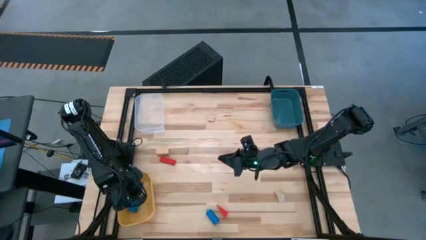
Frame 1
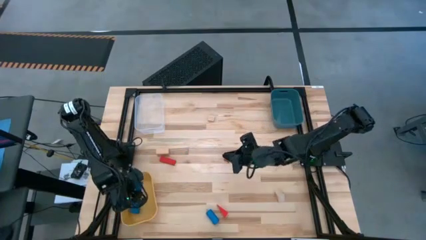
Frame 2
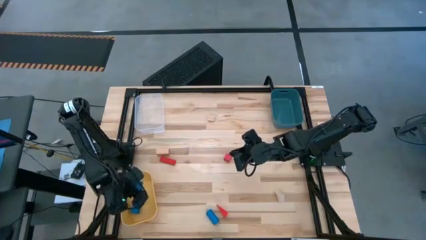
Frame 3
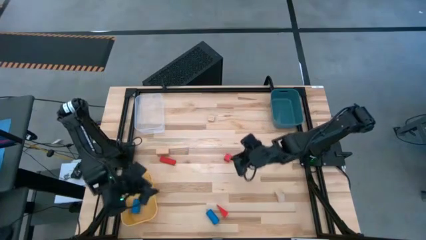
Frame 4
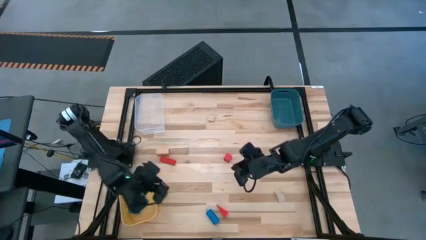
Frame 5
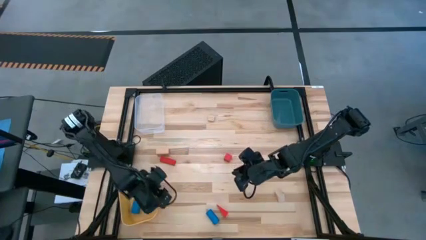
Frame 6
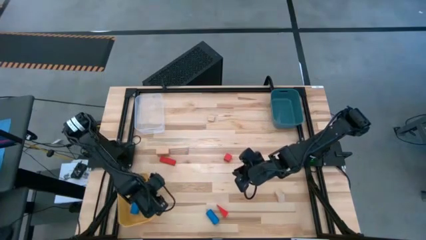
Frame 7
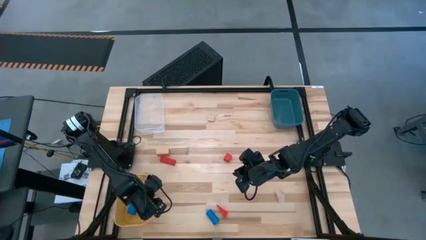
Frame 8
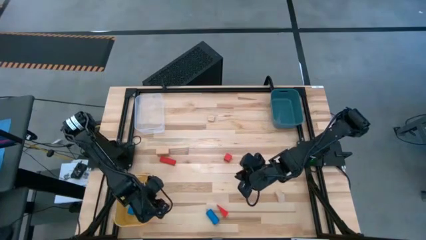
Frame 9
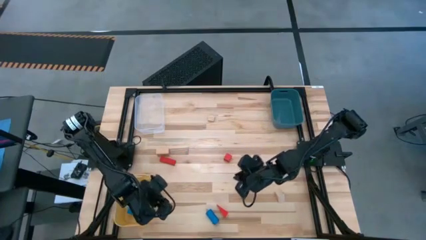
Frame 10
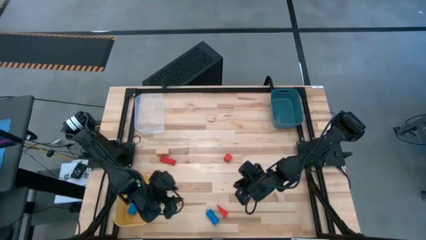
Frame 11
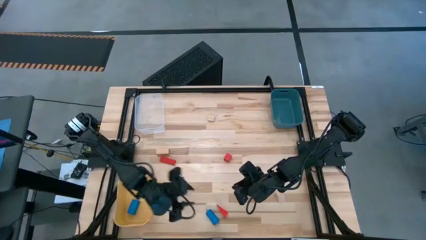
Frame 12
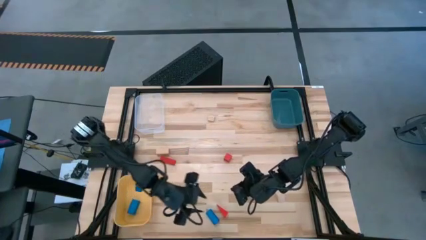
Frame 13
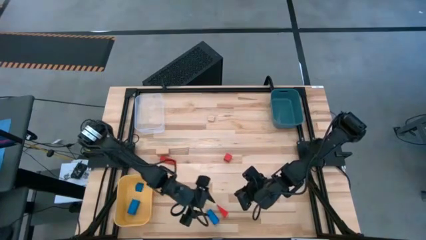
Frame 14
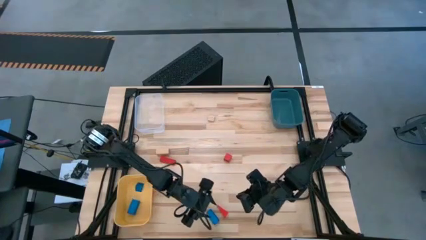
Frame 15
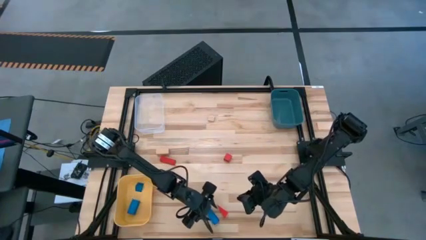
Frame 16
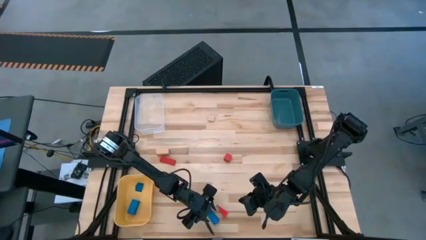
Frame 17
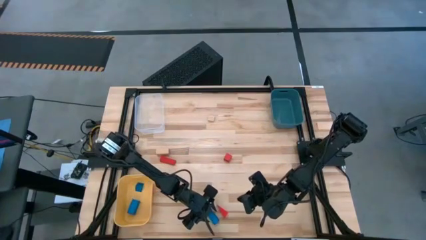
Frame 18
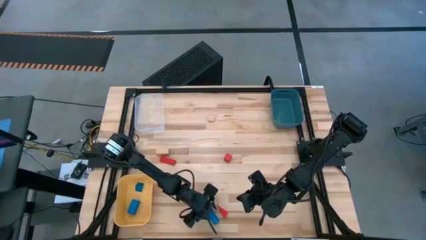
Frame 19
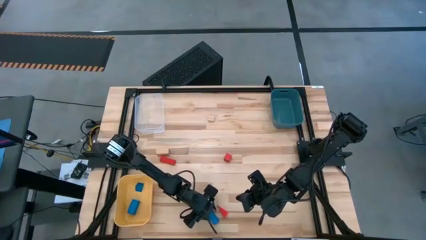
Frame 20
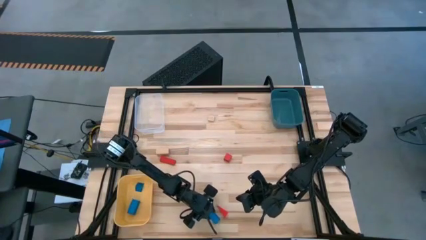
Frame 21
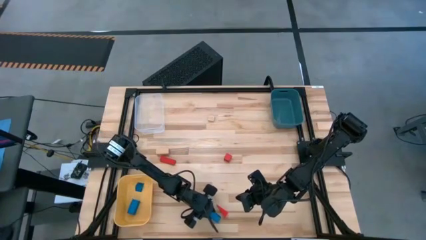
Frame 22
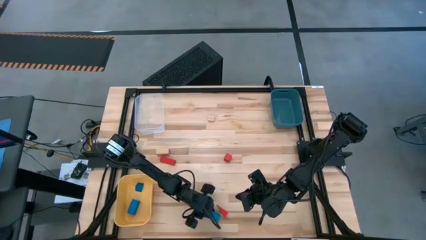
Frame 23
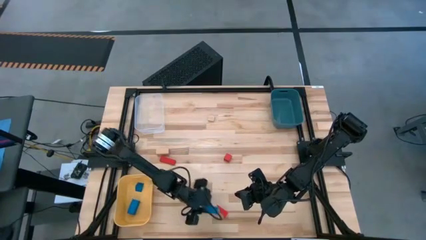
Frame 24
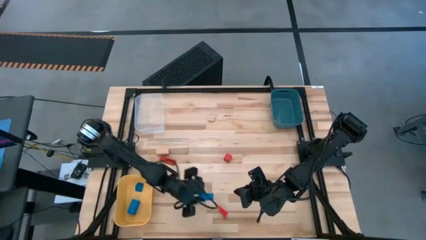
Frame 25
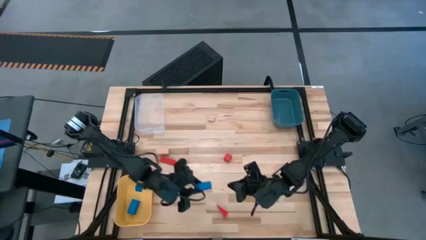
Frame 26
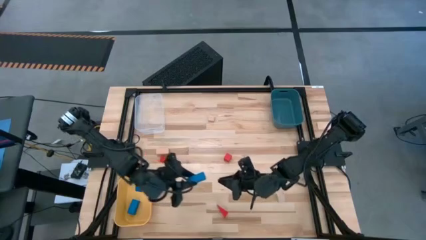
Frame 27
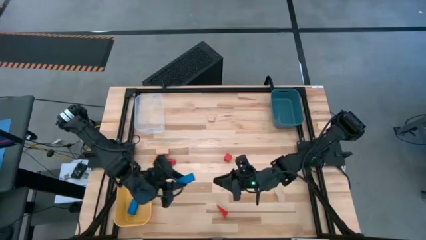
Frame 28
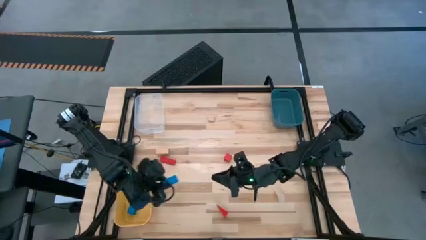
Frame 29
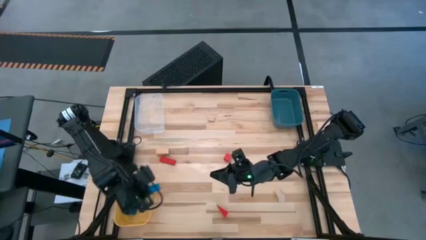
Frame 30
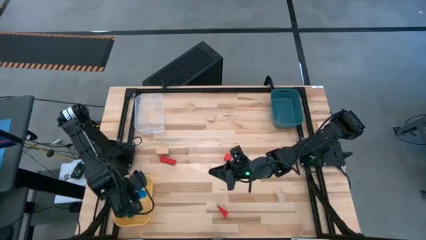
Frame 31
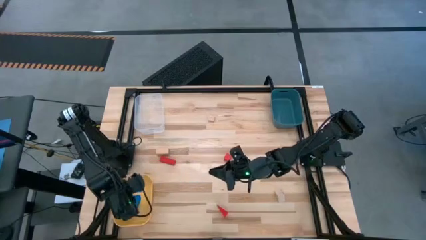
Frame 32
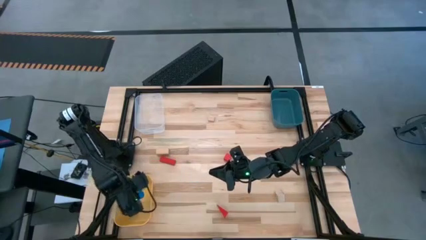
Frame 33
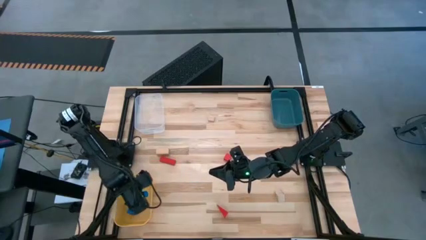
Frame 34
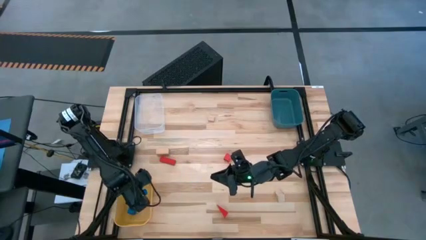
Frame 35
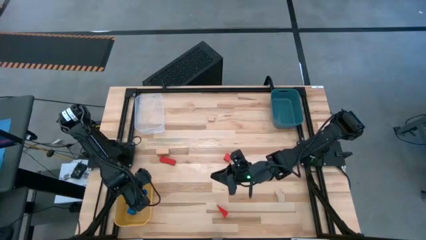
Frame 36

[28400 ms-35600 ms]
Task: Sort & place blocks by color
Put the blue block into the yellow bin

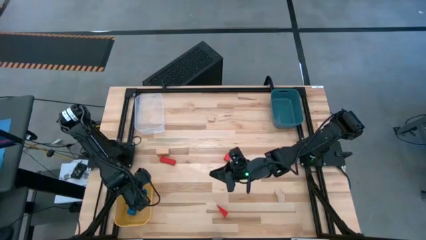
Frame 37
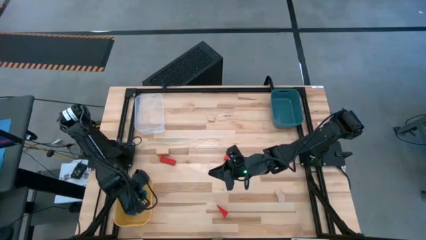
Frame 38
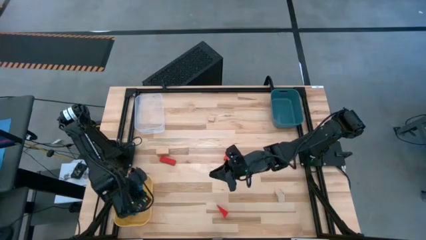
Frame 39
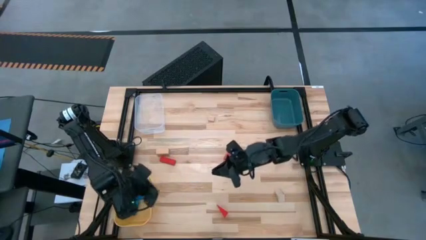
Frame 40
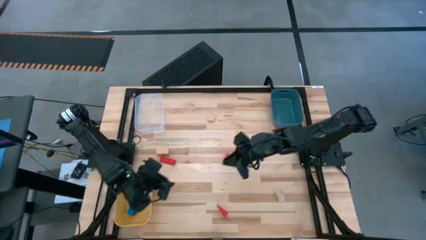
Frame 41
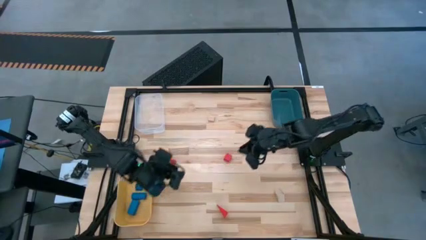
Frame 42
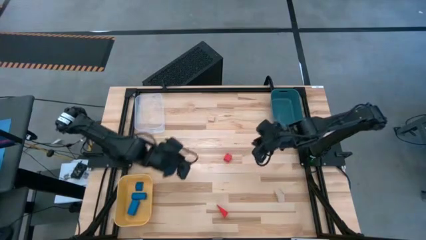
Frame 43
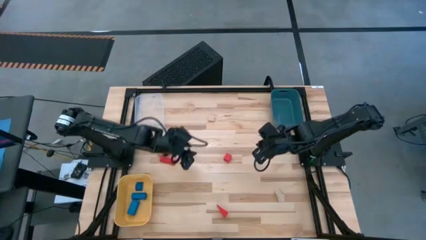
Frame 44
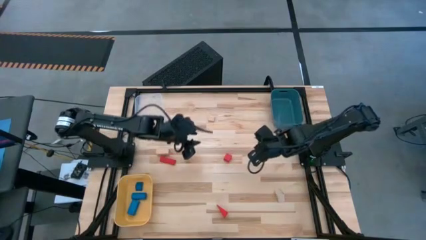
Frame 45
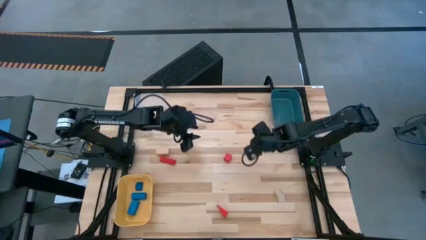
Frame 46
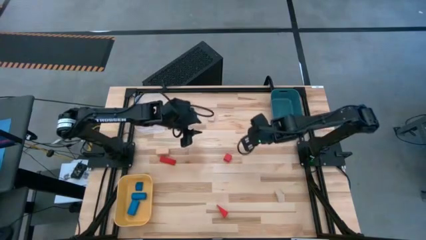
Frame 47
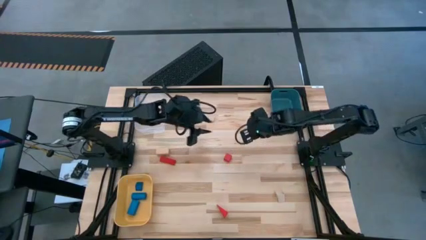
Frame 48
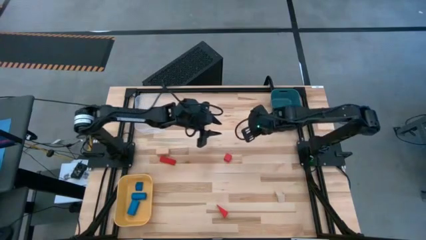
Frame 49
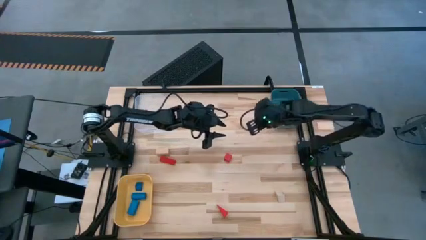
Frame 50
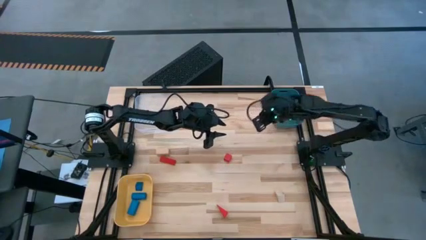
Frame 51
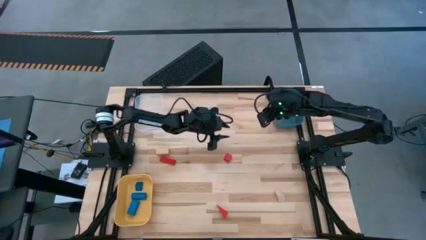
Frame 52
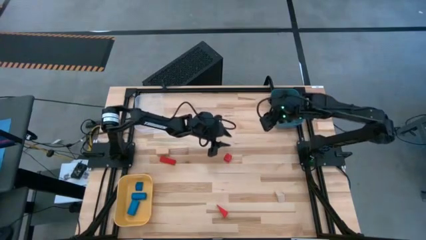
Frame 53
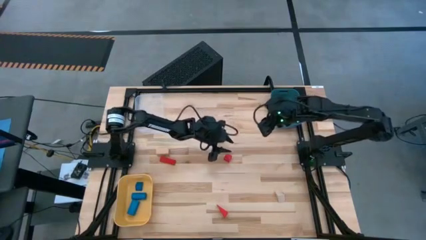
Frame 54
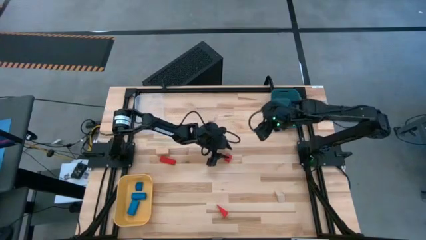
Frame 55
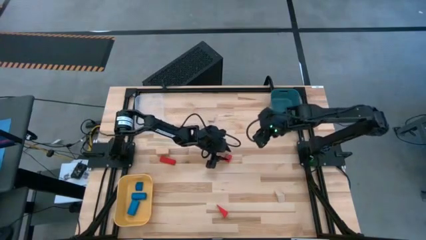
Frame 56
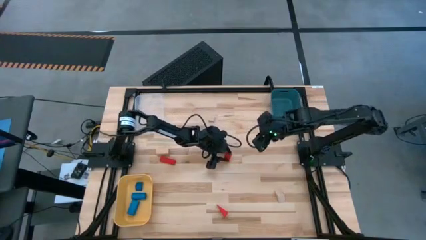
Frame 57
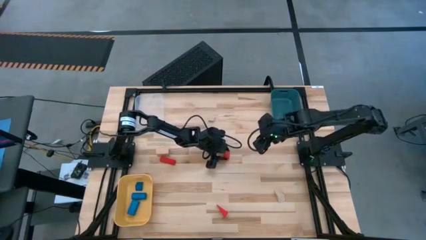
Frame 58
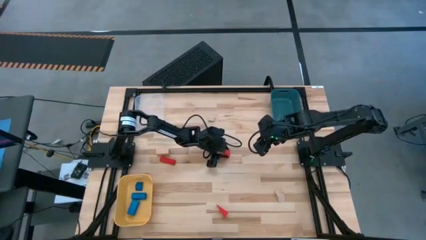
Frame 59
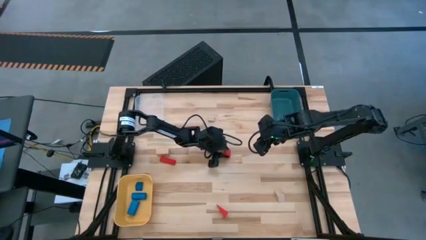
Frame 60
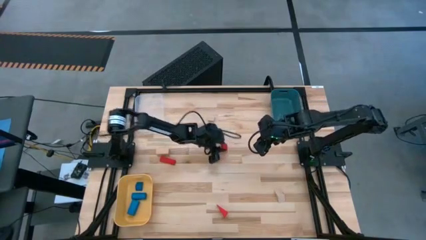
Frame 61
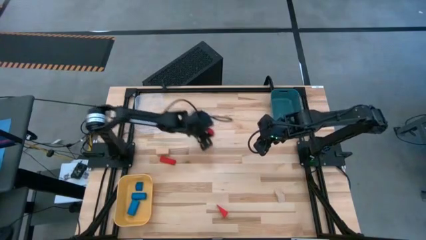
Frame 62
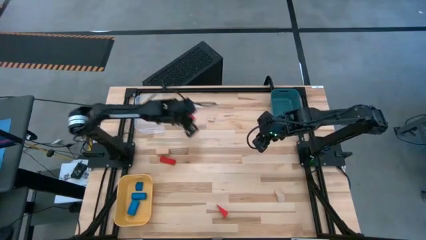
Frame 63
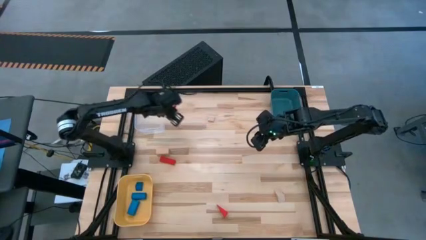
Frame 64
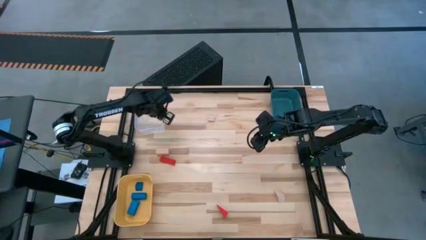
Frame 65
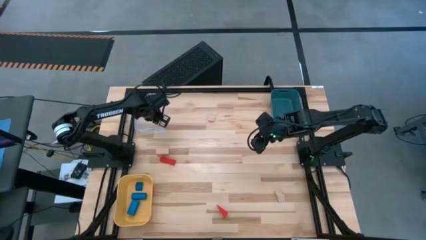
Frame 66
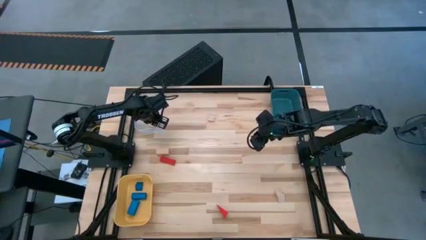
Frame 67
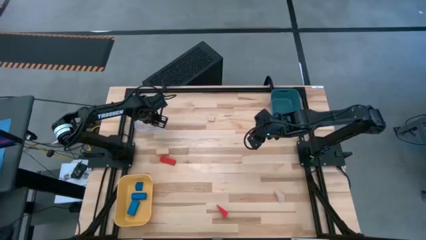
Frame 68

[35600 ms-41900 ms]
Put the top right red block into the transparent bin

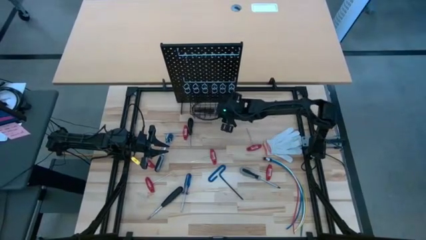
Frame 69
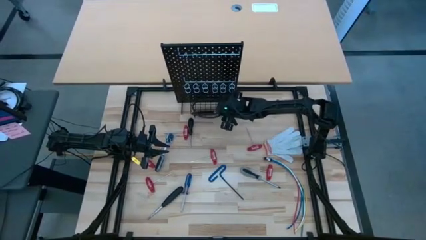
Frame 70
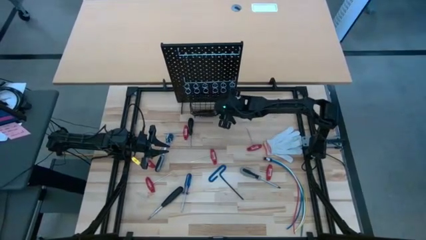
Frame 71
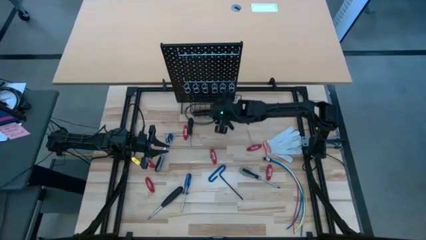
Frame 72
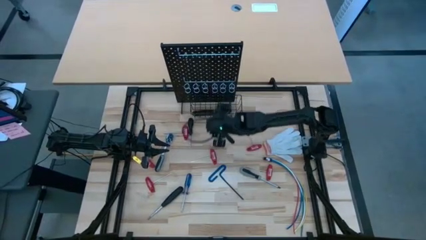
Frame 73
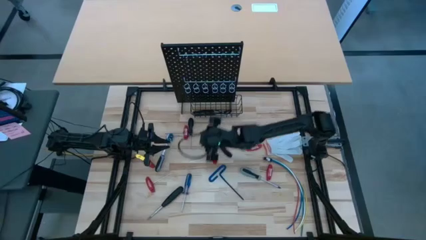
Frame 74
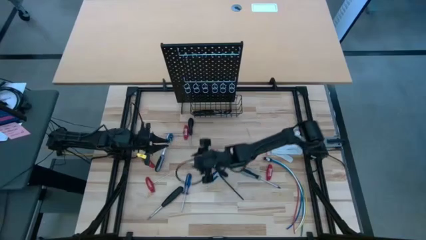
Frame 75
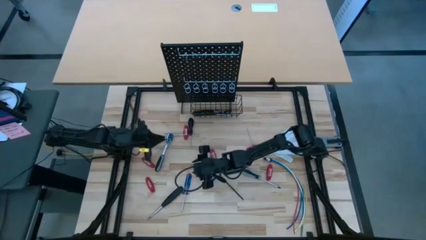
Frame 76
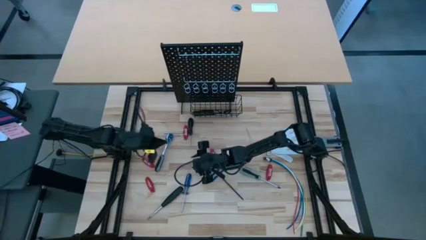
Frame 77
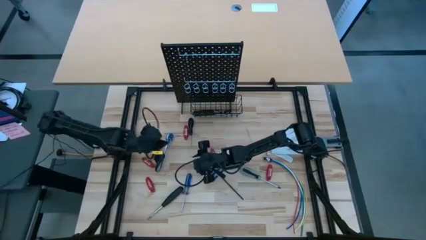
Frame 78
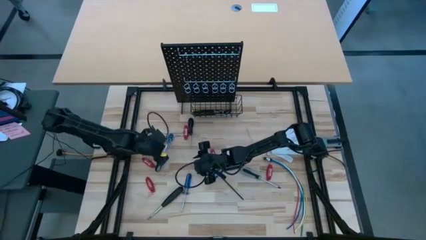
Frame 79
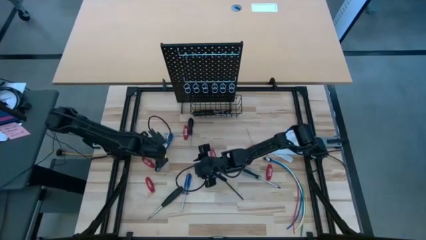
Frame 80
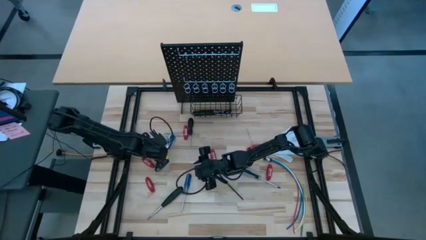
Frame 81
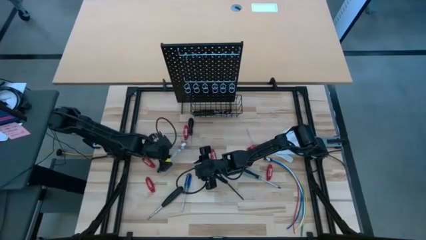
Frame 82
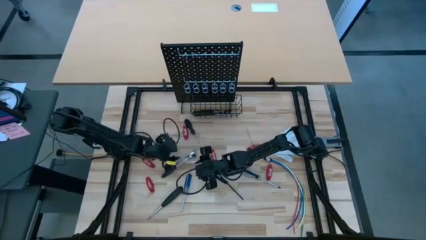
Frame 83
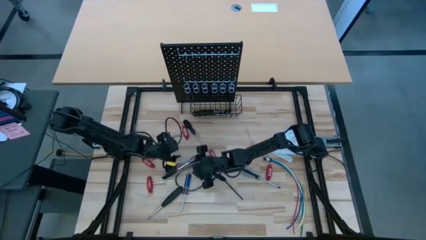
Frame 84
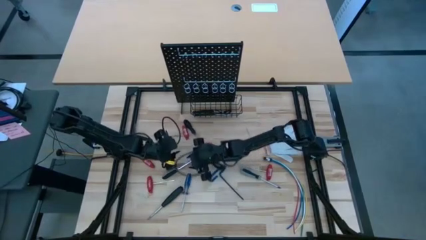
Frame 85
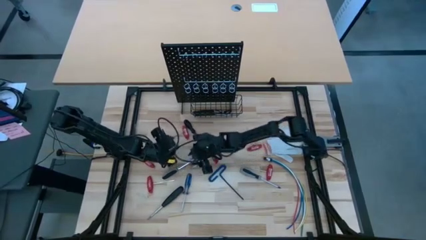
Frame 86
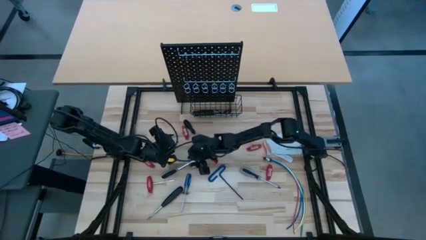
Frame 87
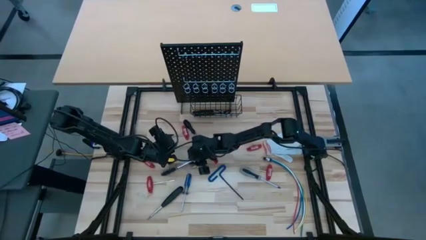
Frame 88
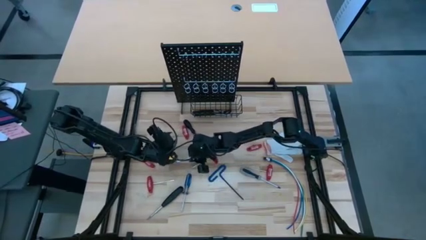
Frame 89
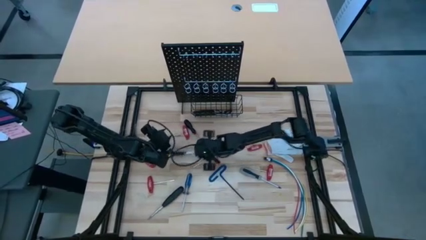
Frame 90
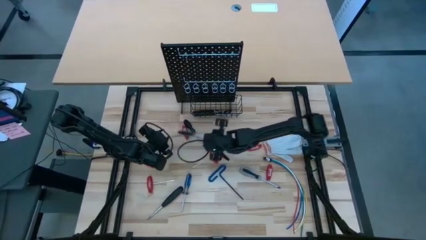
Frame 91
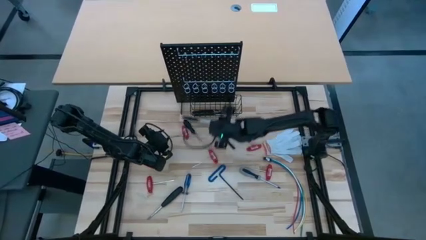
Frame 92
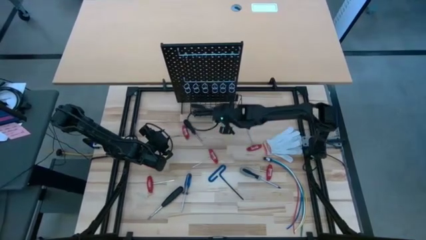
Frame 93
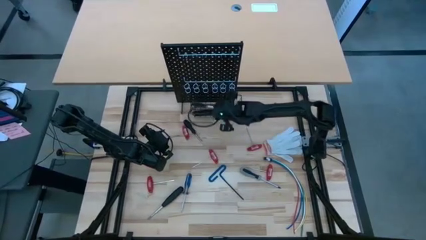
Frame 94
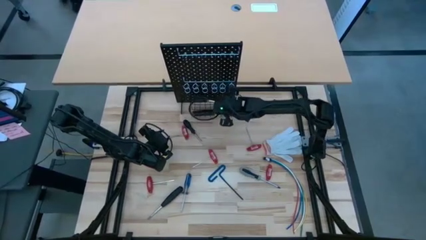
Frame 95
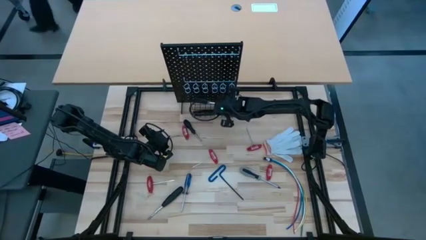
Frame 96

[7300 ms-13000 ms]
Task: Hang tools onto peg board
Put the ratchet wrench into the black basket on the pegboard
